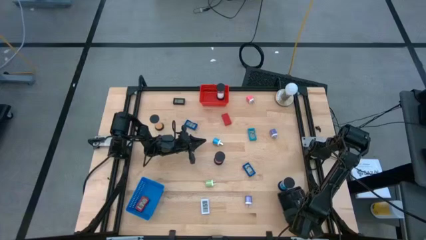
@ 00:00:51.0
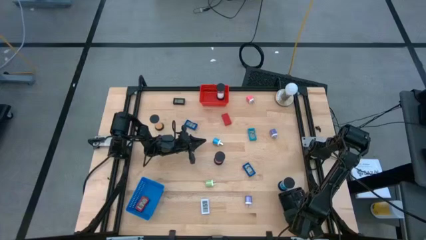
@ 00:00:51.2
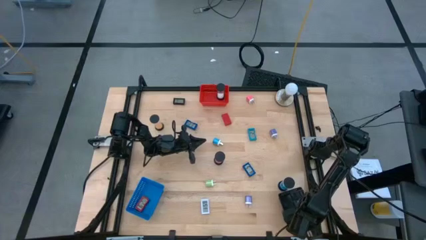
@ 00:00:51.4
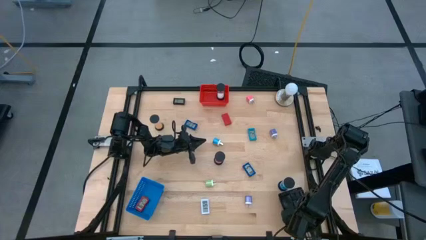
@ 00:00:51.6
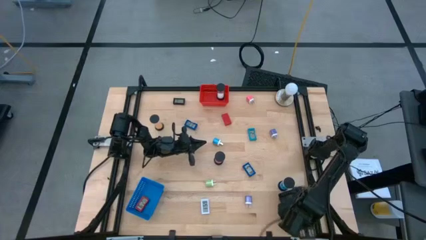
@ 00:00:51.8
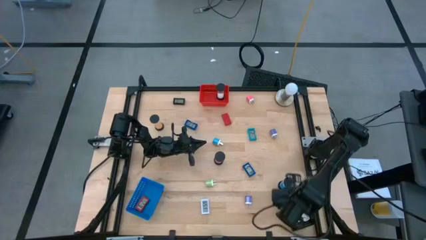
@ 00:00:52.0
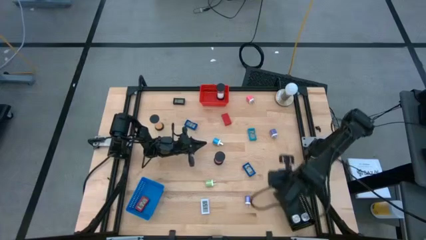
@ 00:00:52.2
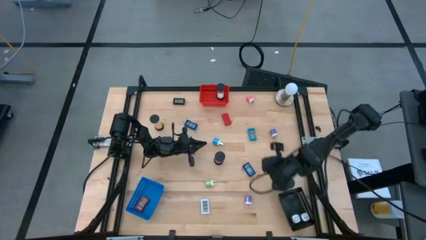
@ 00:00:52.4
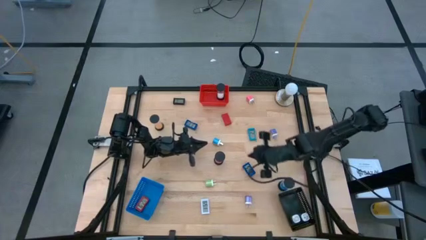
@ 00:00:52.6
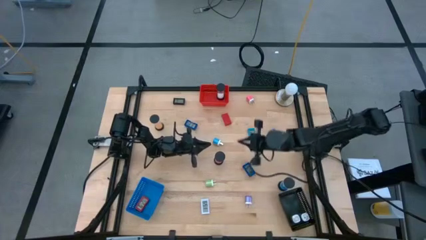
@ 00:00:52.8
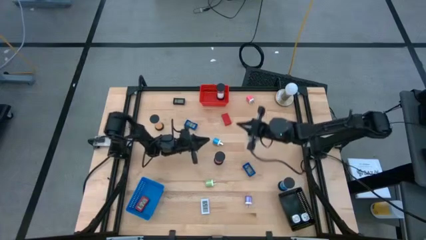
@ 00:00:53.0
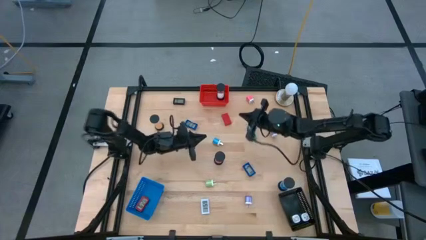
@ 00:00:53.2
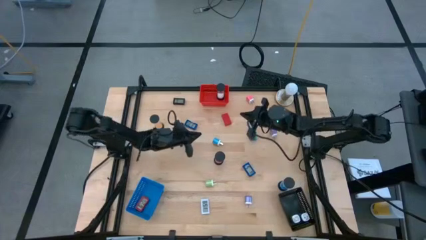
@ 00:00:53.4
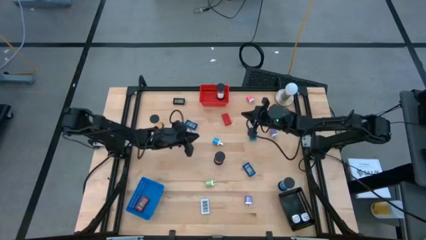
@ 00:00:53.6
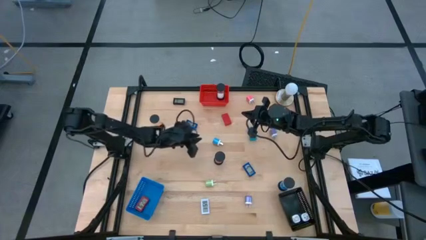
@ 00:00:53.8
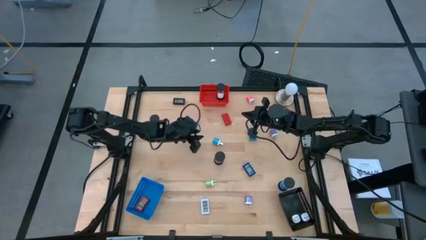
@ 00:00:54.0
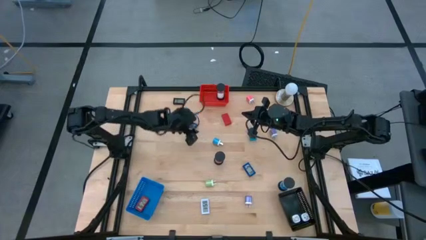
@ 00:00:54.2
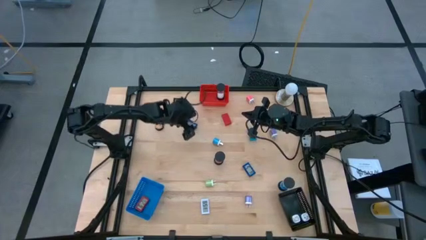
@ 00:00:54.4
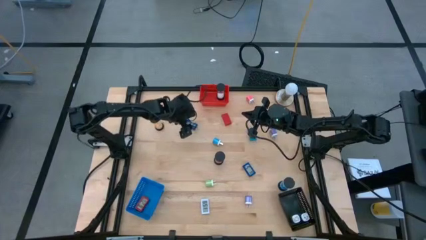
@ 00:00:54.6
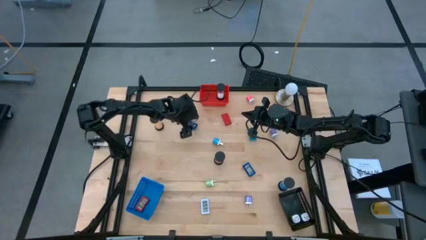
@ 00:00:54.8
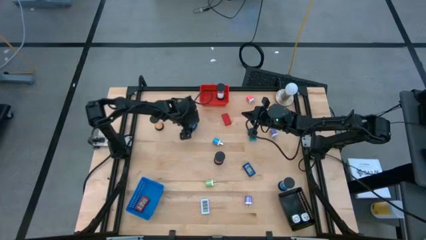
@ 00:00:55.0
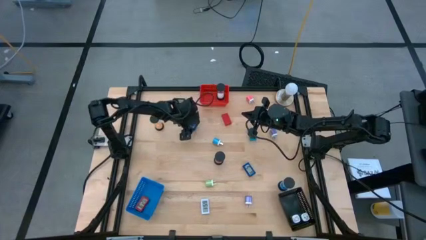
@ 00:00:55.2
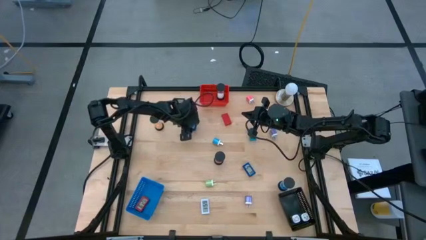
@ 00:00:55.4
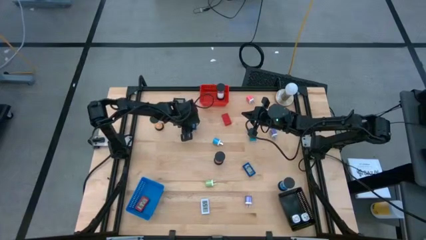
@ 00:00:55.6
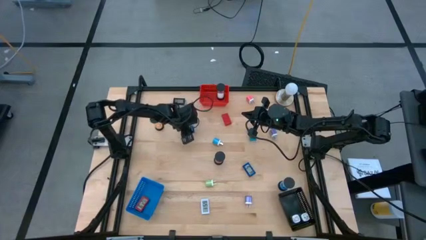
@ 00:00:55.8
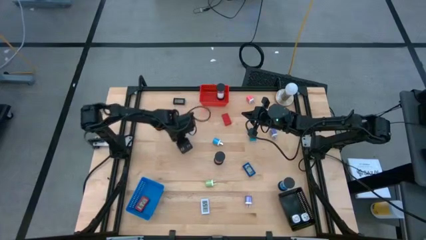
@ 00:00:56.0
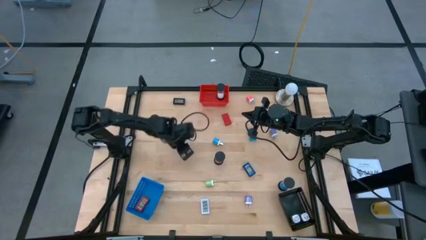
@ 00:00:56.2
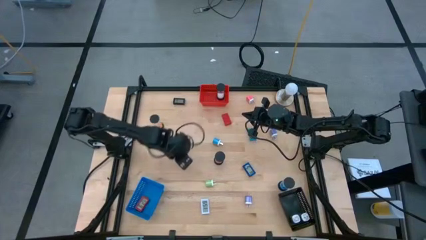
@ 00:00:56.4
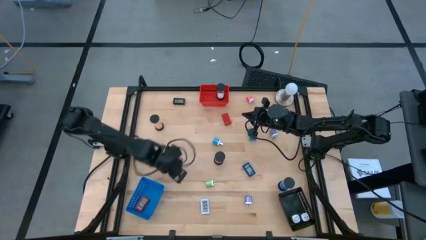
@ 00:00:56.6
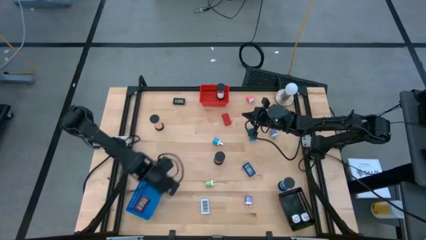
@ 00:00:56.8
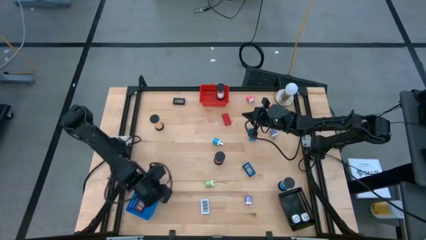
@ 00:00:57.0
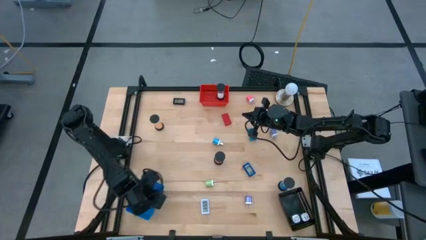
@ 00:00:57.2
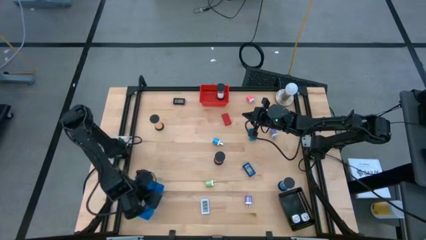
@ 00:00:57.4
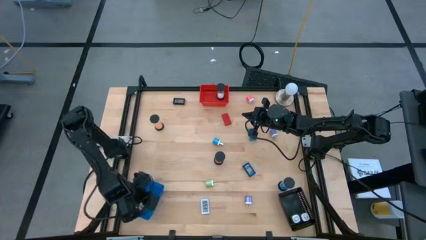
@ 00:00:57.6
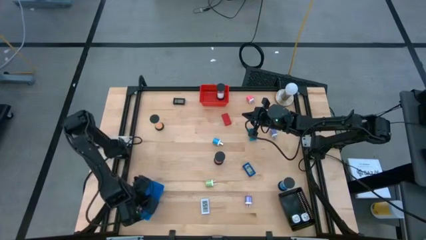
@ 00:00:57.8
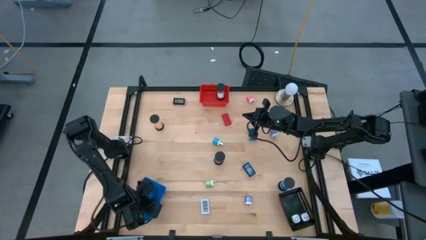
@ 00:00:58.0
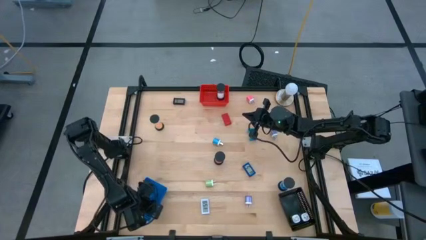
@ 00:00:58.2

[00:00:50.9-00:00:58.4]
Task: Pick & Place Office items
Put the top blue digital timer into the blue bin

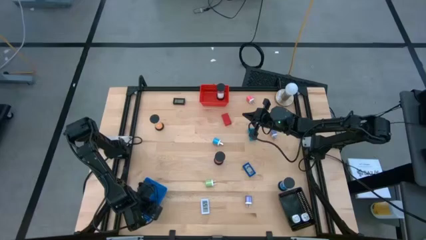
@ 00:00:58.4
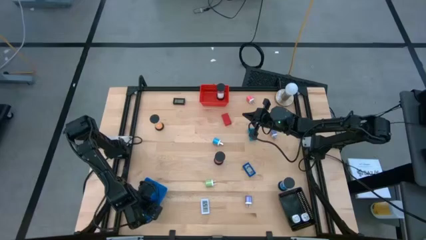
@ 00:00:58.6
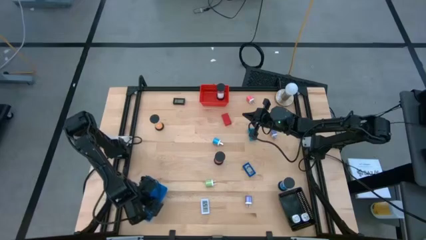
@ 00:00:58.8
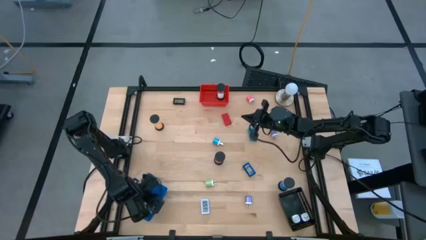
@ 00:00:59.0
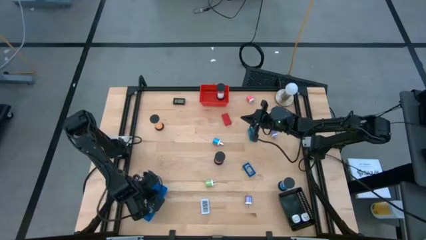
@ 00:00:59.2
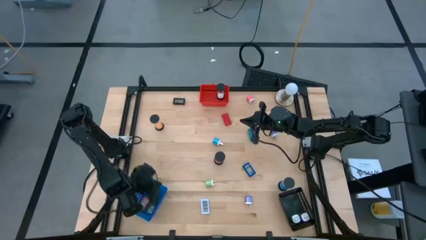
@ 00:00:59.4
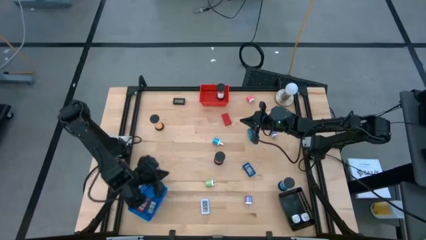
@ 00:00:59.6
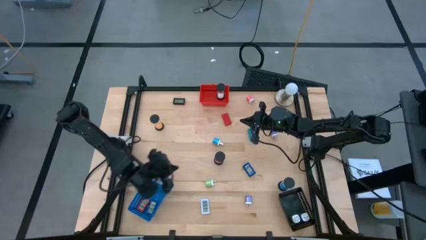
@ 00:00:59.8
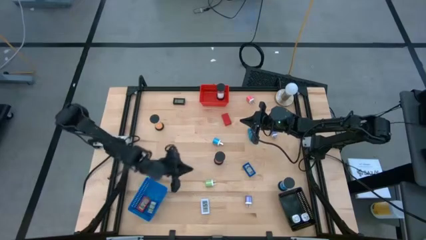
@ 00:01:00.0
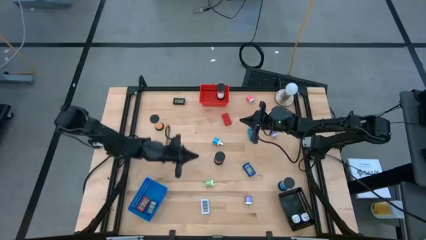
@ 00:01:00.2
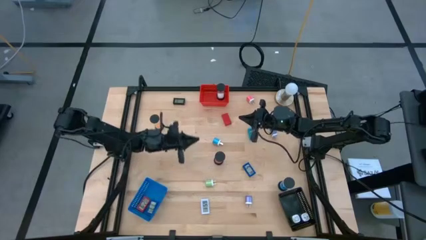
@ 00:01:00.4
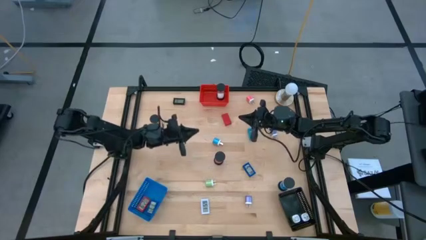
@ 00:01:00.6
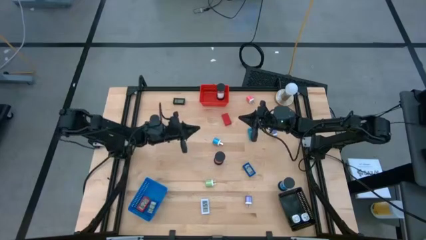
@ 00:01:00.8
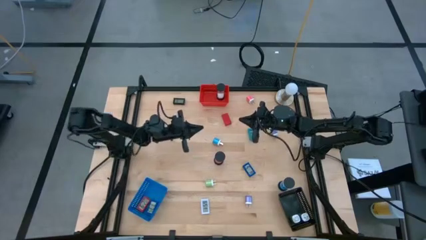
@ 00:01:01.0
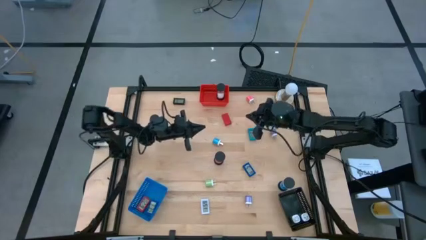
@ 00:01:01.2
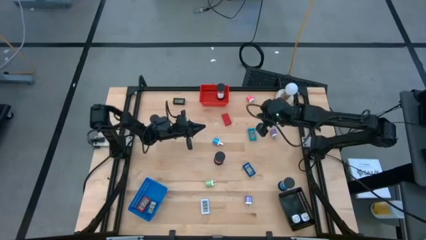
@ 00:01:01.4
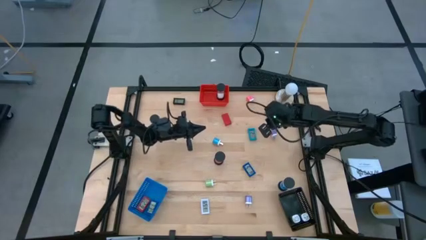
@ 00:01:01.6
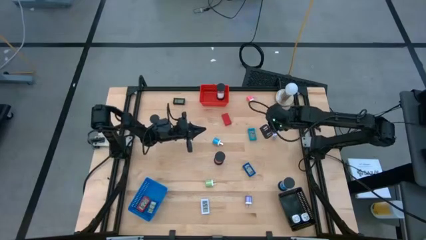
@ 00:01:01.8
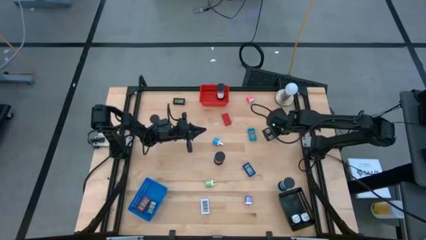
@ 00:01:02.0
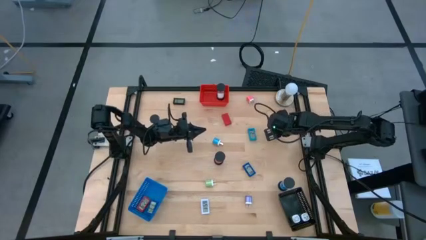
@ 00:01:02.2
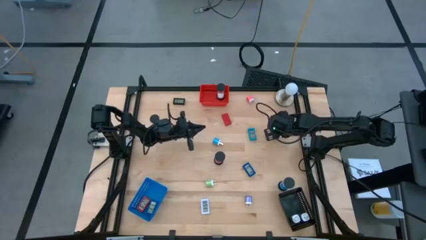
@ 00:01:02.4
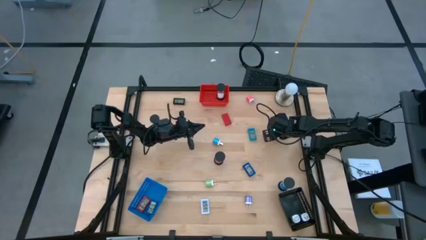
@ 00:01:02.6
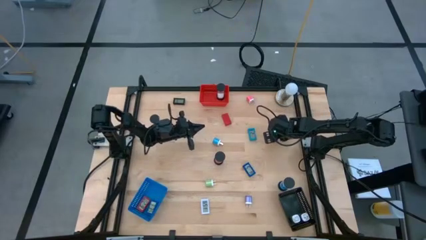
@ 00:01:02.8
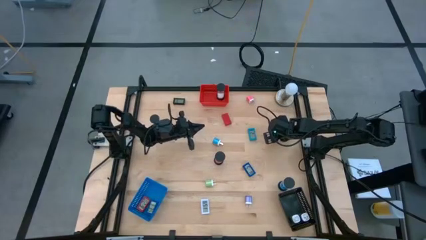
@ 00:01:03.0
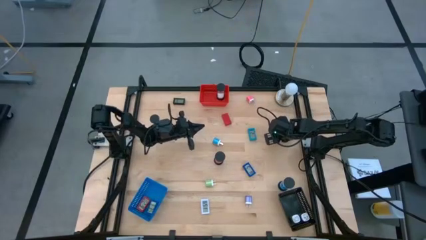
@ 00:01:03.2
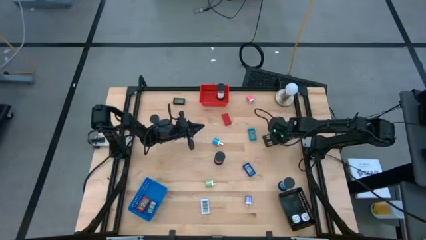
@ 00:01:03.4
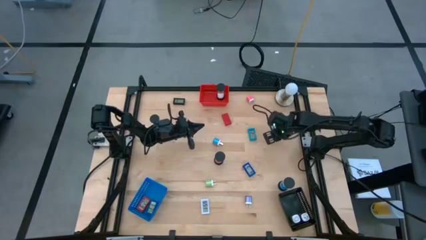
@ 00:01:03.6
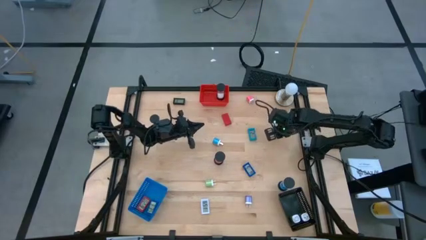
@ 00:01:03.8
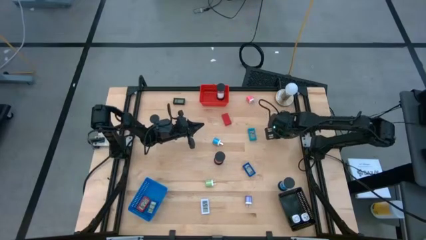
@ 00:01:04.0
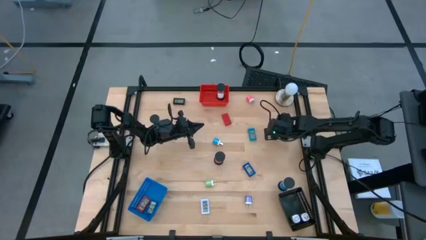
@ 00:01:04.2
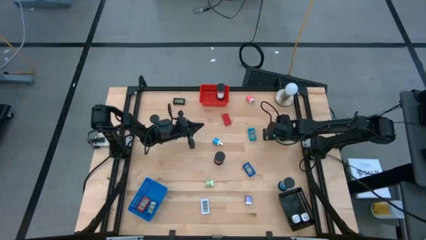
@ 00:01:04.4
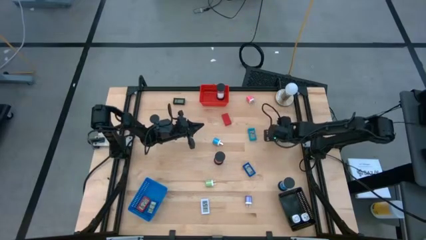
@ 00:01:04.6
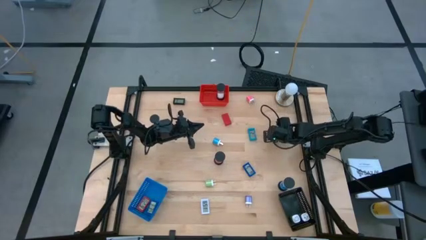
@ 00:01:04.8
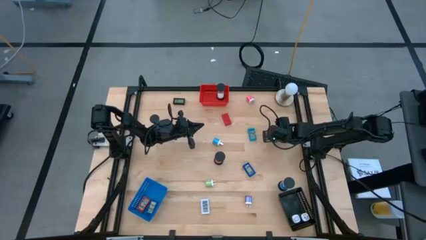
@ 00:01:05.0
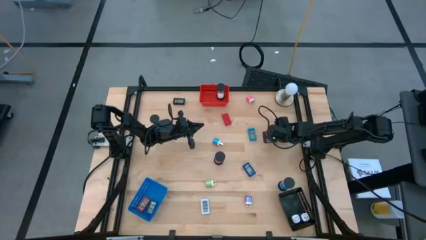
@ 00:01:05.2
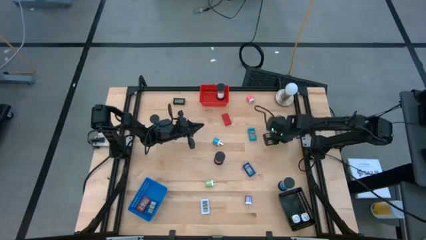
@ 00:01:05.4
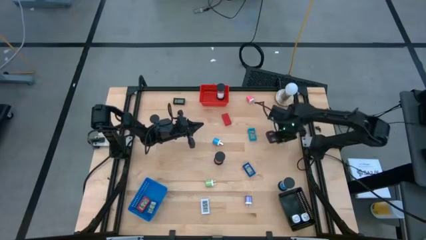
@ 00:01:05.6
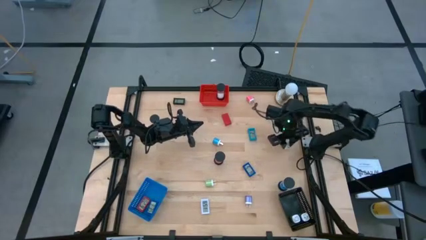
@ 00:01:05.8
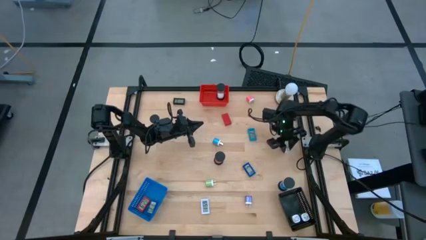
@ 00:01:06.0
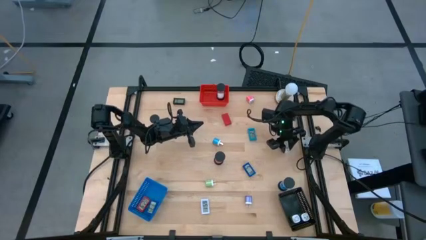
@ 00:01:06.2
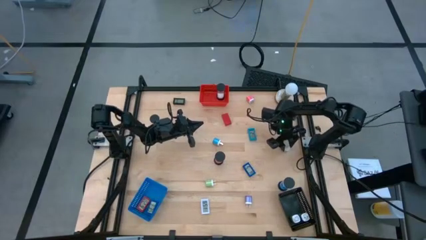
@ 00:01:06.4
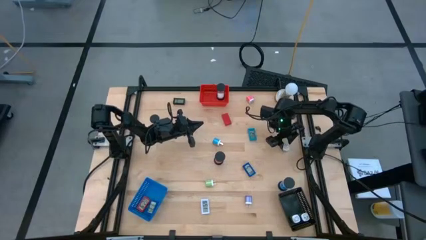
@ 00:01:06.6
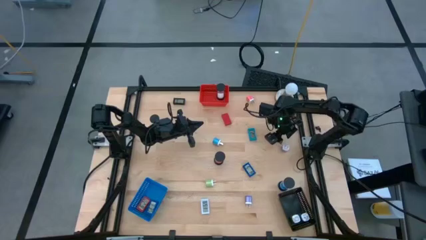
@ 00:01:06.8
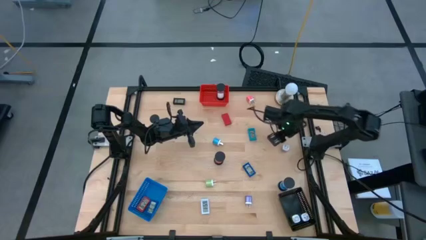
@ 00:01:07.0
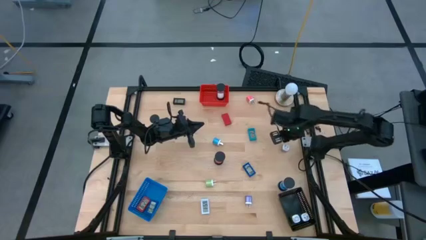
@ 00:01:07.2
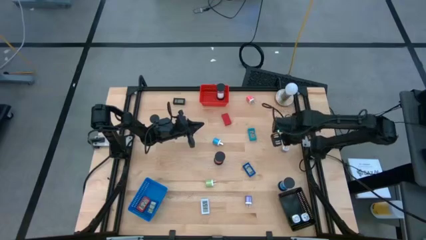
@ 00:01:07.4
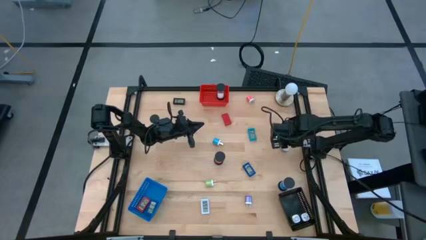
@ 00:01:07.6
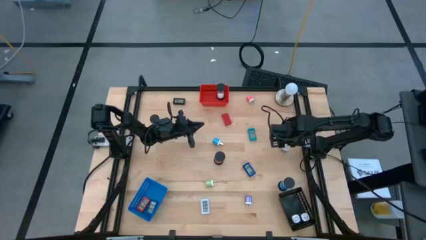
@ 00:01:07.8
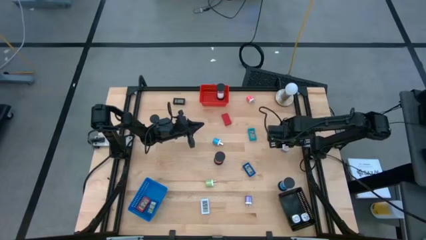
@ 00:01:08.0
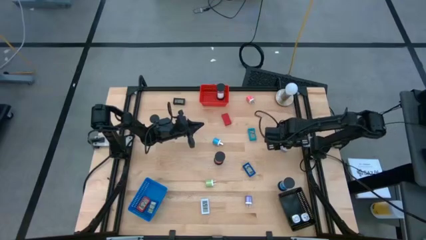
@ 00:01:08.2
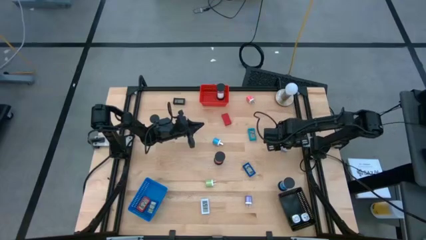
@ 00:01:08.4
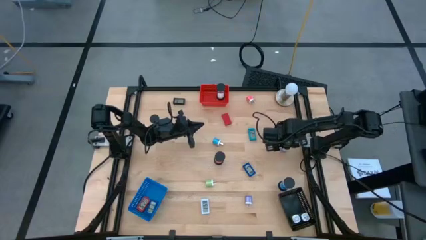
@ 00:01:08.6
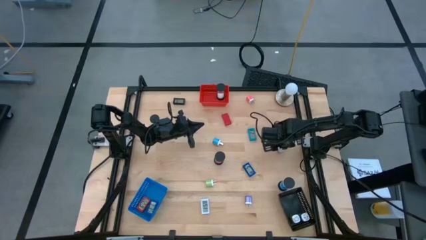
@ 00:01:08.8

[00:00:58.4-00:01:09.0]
Put the top dark blue charger adapter into the black bin
